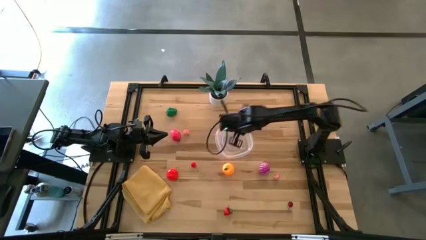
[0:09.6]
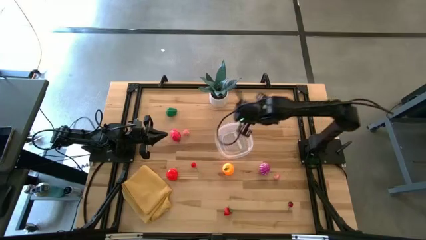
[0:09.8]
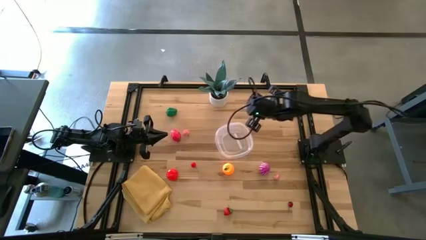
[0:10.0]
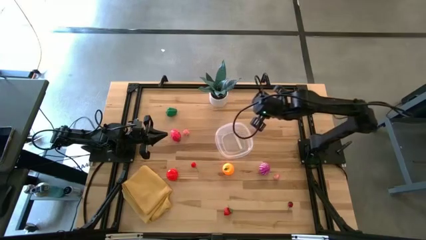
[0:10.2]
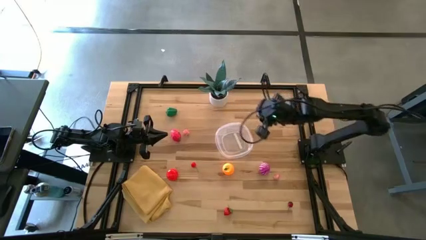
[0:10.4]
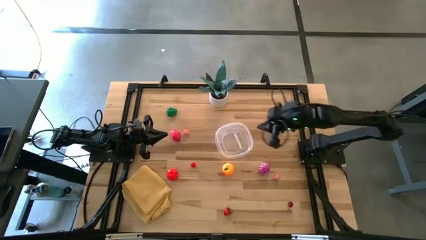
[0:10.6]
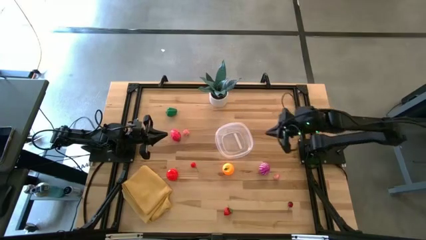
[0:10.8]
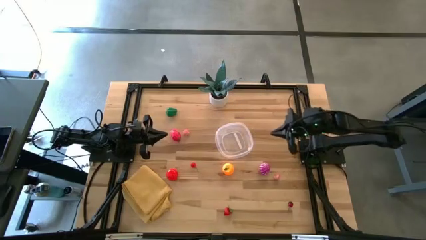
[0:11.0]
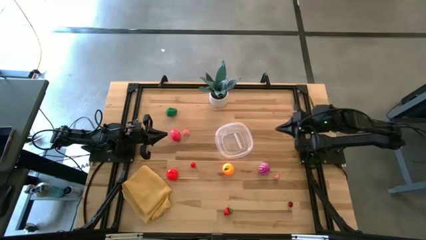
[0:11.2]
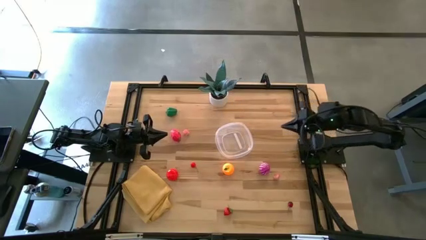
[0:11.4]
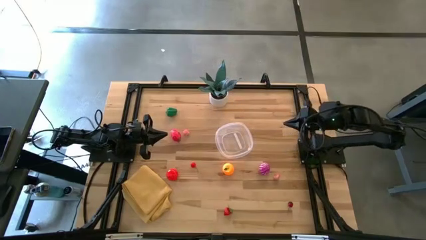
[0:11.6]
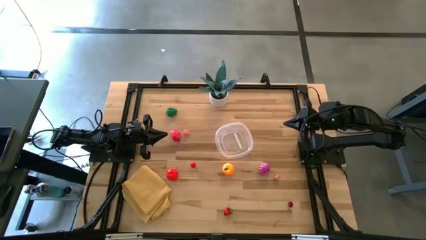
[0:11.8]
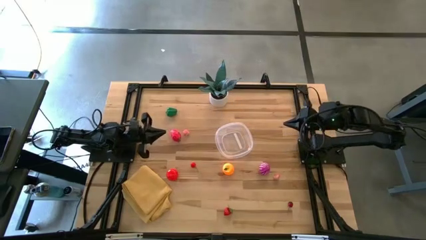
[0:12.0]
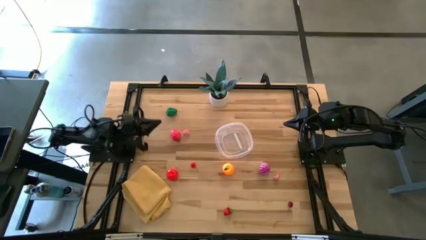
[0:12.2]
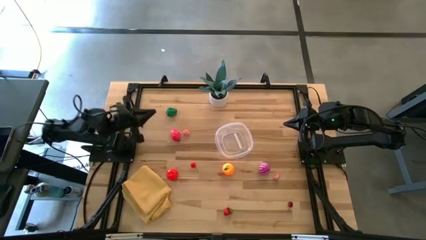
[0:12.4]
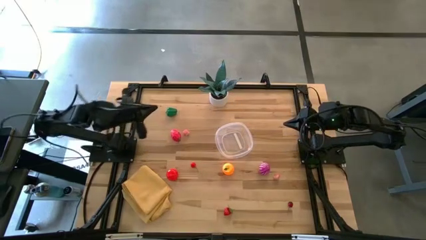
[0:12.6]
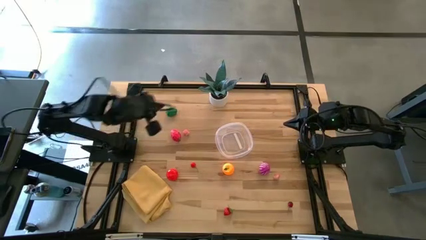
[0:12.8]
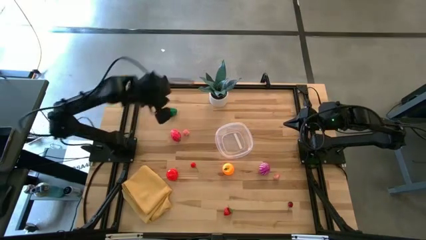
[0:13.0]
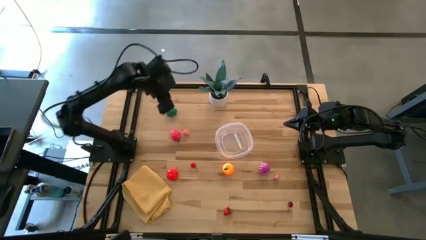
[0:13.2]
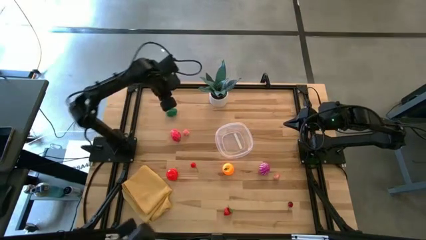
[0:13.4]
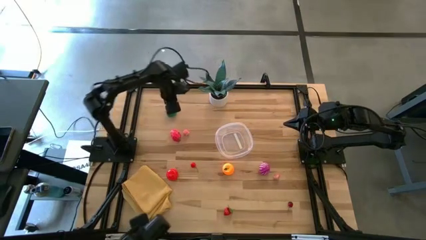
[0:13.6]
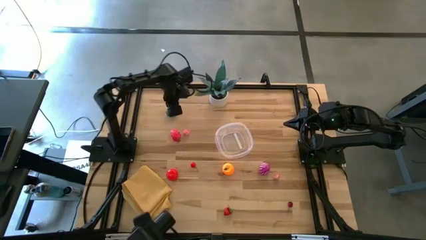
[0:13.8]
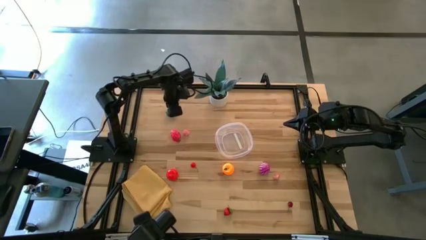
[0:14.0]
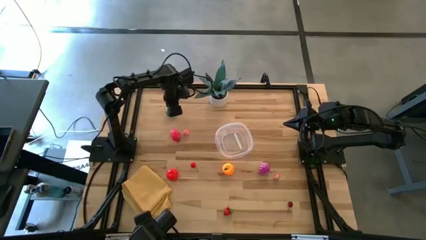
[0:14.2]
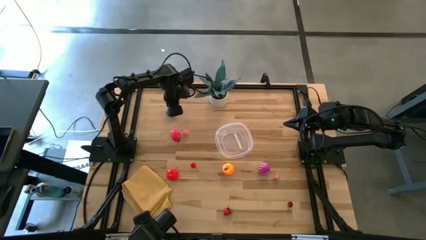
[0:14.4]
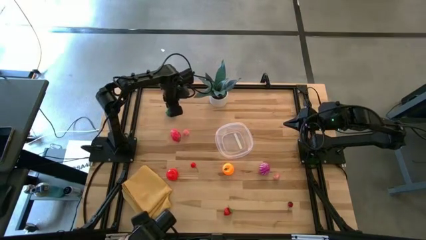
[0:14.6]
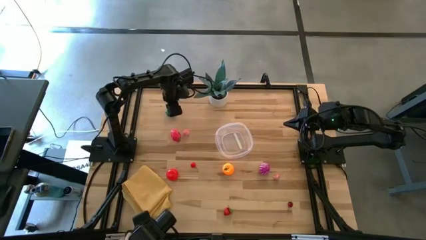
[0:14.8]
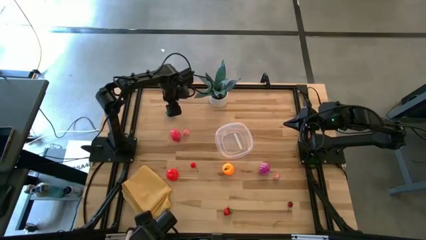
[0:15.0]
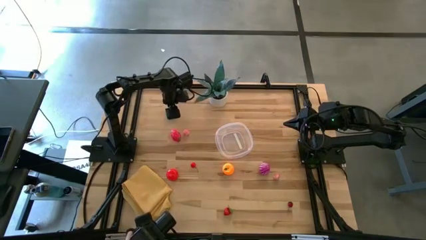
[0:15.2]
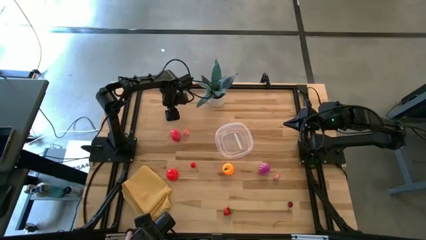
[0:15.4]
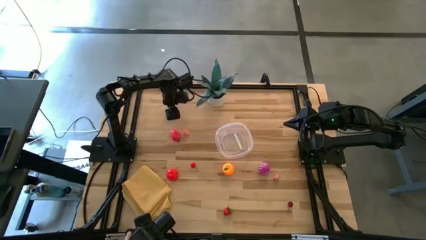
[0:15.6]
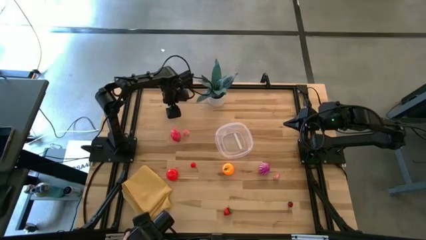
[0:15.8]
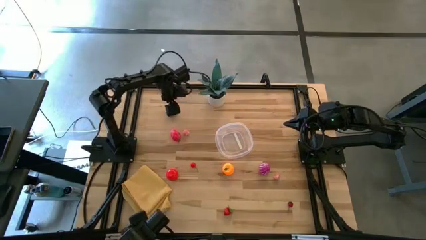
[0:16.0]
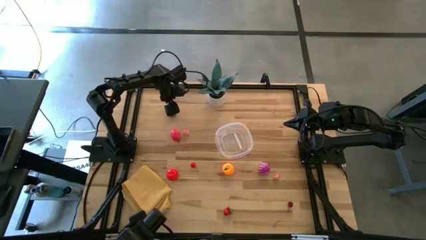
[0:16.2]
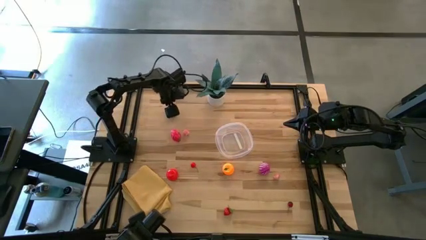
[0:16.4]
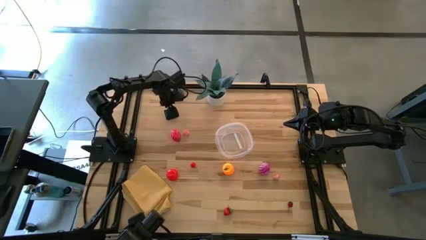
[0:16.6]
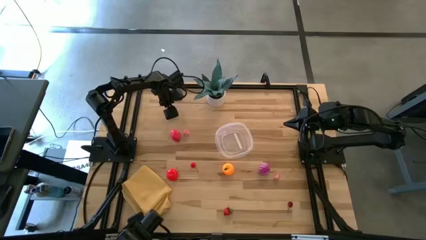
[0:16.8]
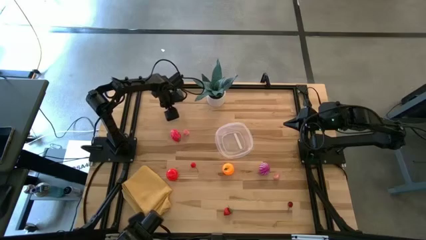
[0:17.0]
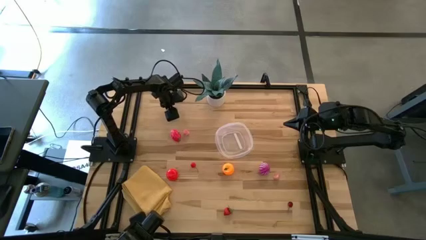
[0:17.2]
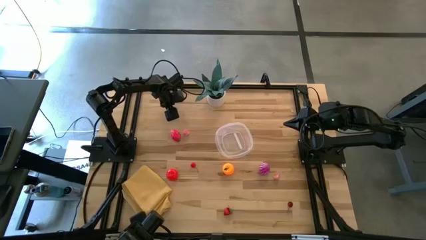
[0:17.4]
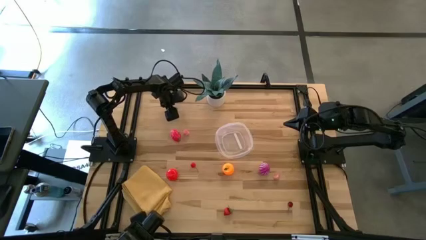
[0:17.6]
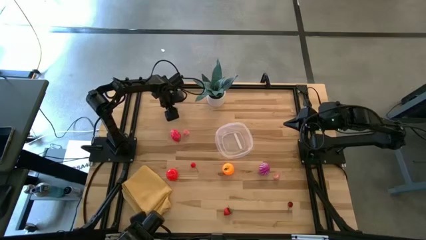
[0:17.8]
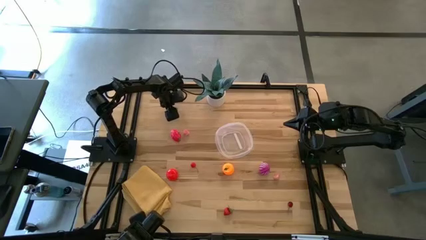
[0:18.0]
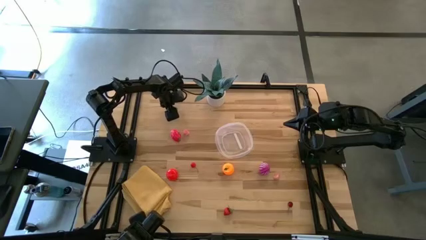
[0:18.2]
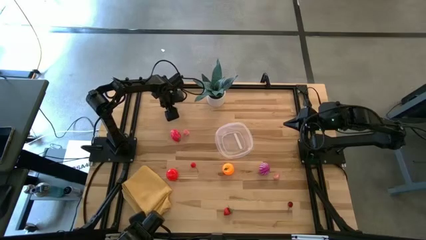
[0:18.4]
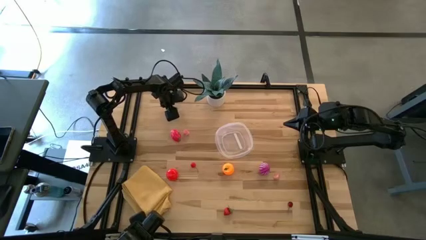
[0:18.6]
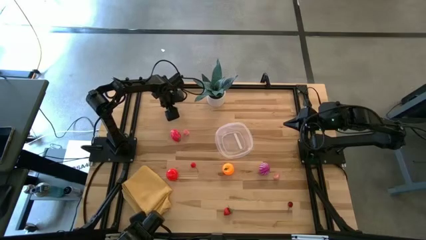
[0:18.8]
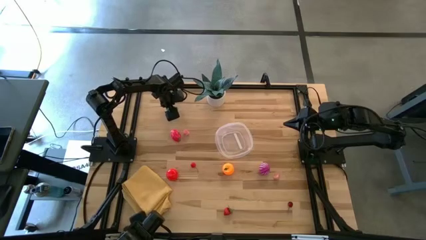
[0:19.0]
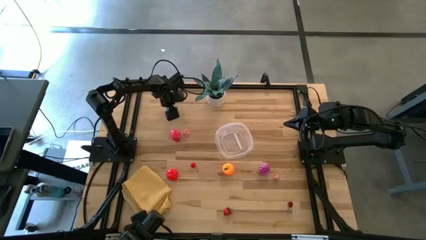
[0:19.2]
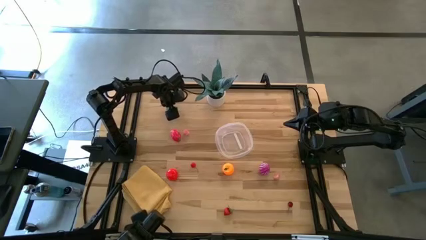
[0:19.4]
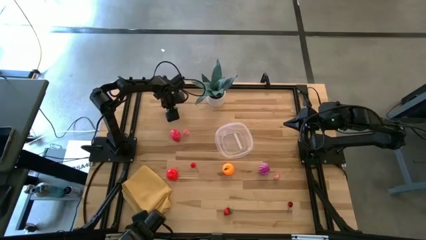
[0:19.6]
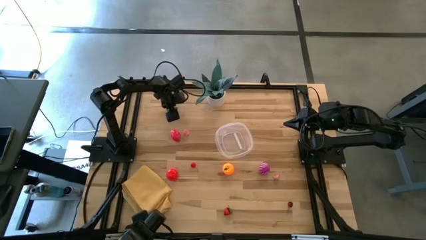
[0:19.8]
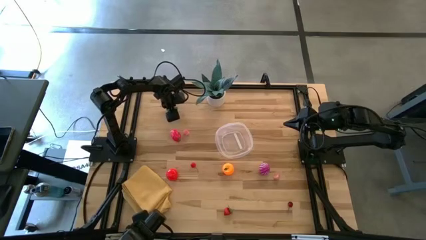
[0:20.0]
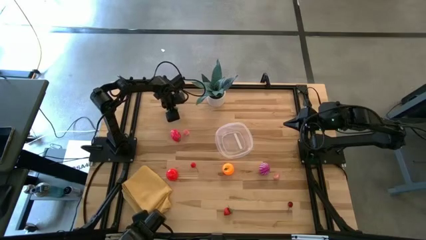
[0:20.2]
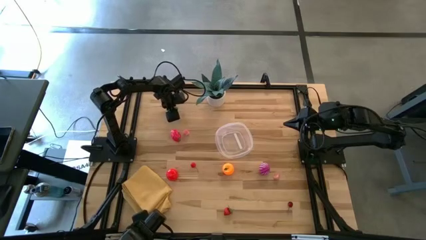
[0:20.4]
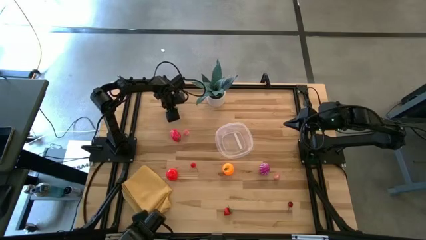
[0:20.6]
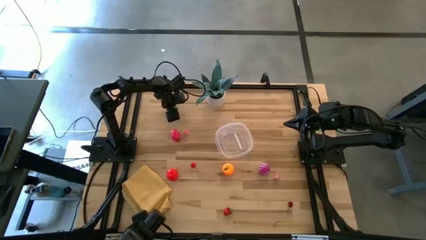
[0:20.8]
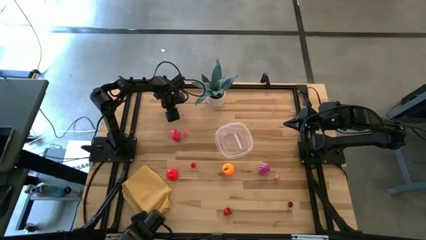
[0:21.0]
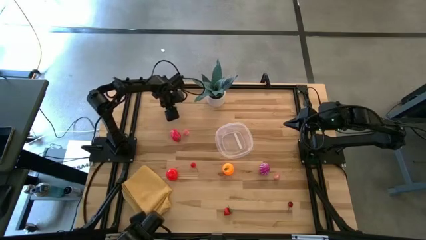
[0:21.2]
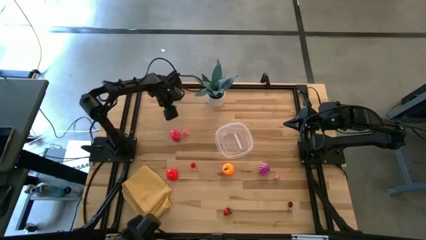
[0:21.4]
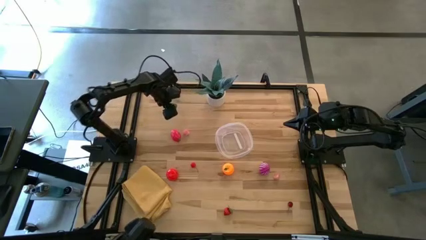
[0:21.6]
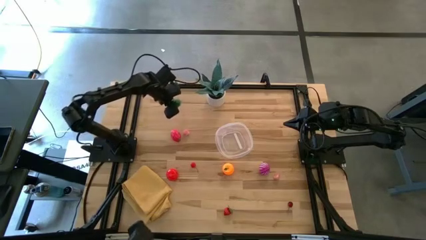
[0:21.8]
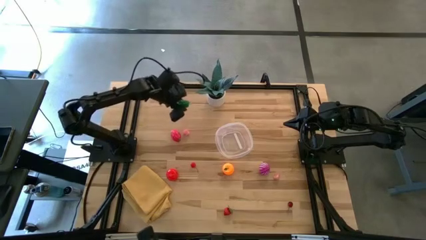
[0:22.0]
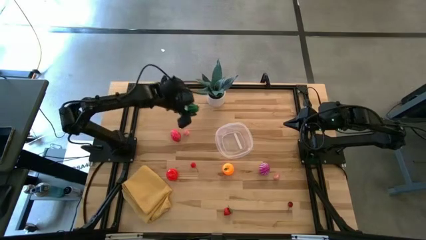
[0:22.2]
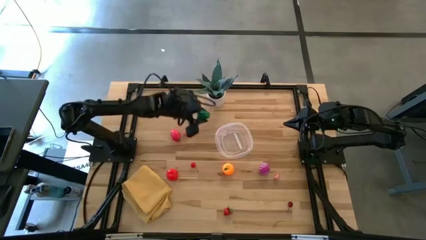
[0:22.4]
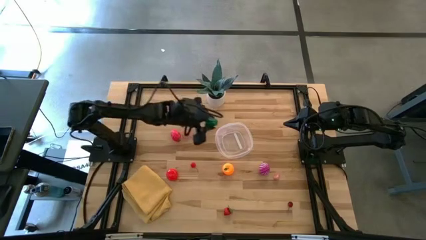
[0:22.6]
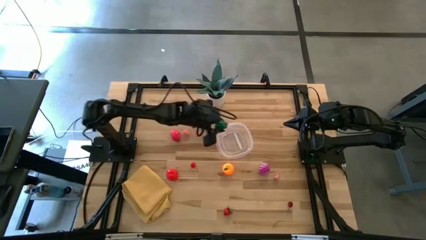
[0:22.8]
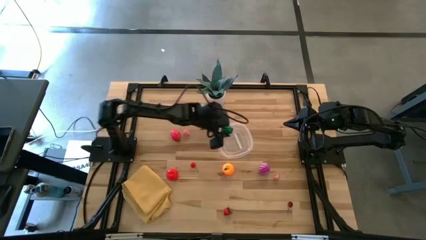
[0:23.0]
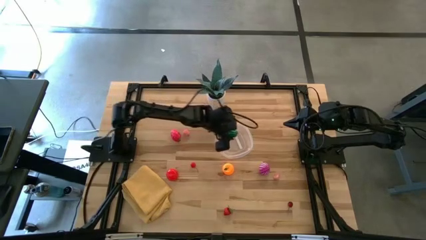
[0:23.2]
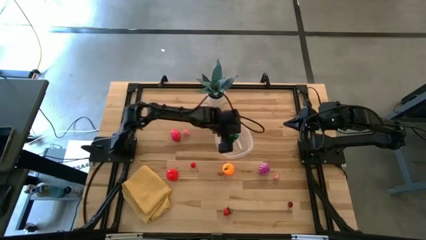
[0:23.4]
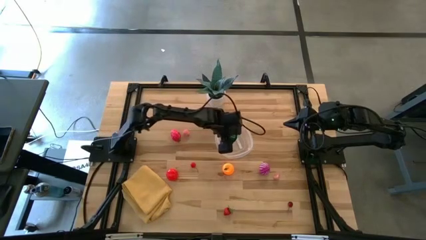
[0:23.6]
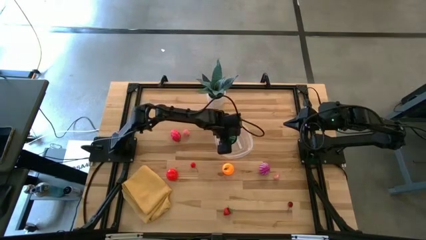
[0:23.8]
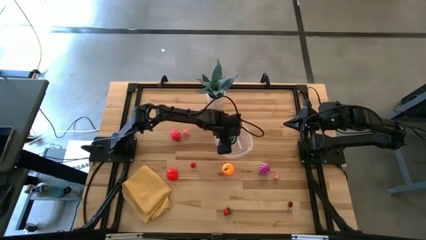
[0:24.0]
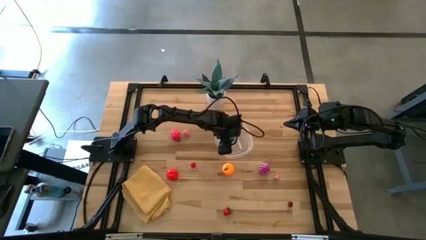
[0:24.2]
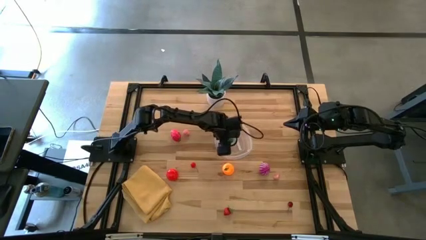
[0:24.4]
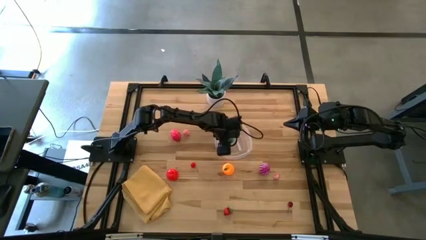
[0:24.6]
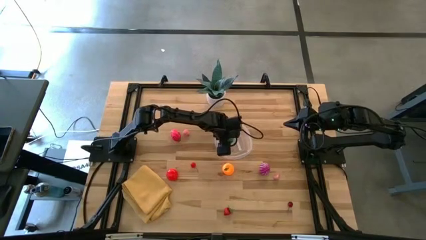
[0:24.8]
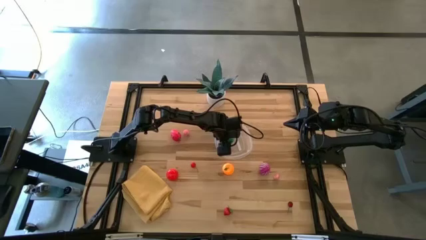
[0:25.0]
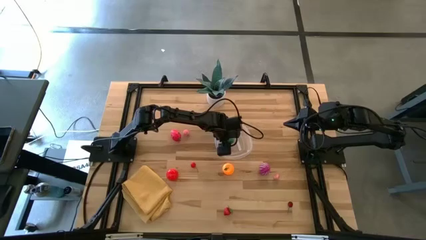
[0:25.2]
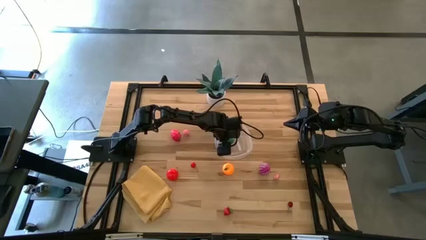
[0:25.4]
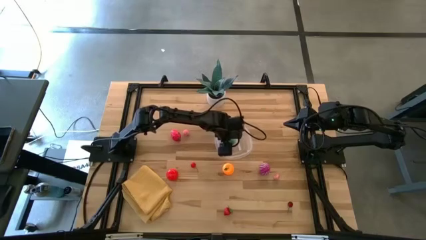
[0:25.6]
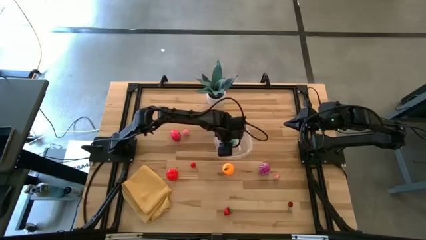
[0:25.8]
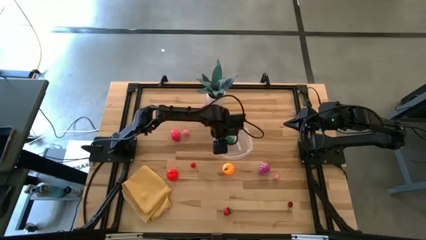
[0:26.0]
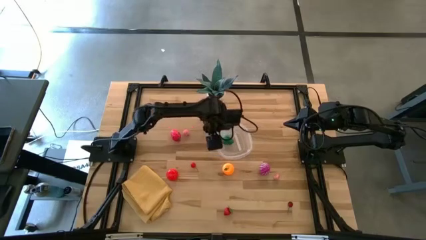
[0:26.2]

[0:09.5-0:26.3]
Task: Pick and placing Produce into tupperware
Put the green bell pepper into the transparent bin
